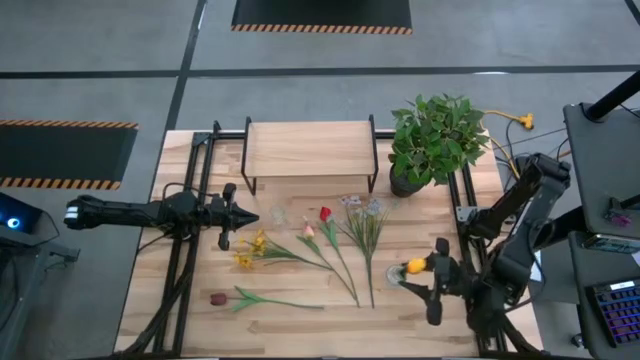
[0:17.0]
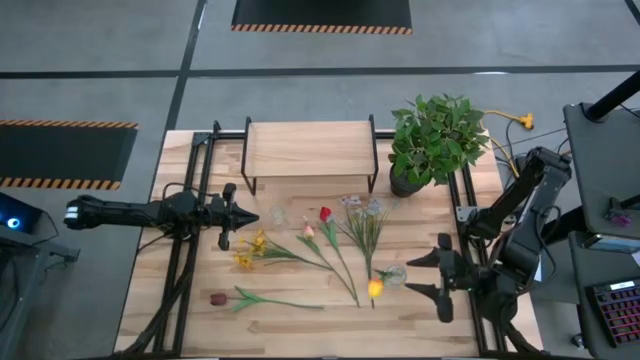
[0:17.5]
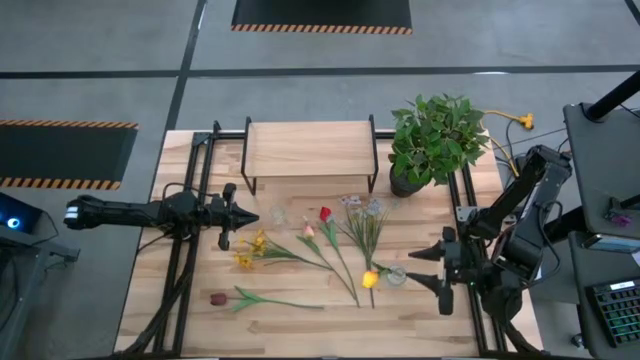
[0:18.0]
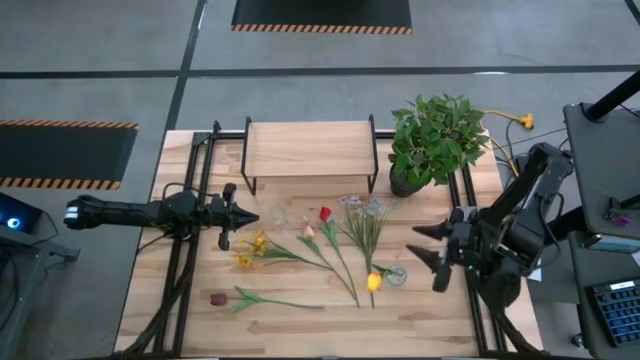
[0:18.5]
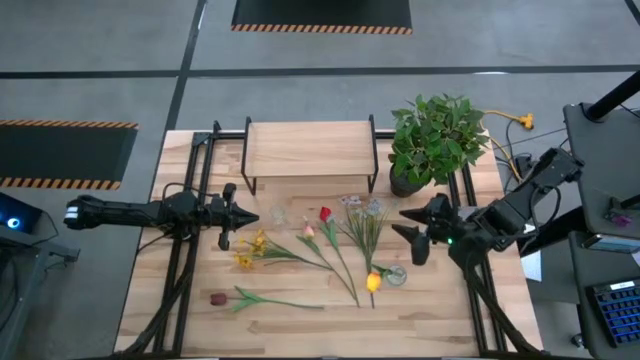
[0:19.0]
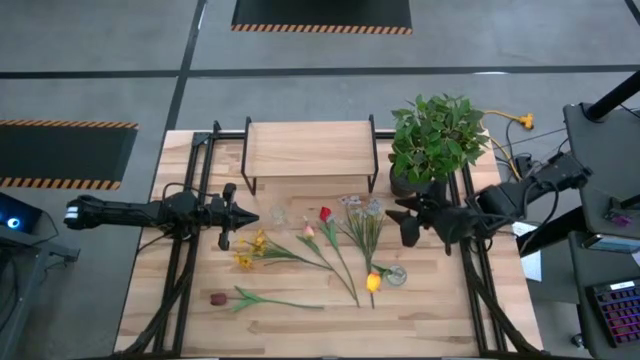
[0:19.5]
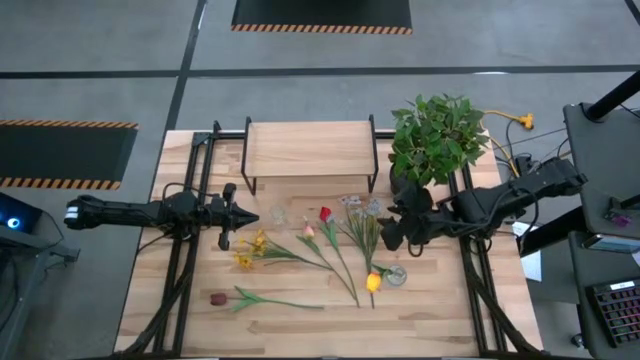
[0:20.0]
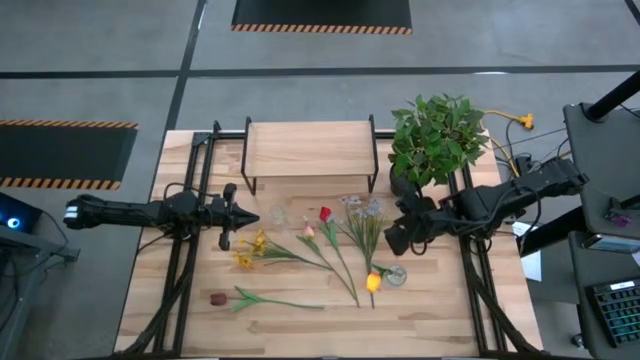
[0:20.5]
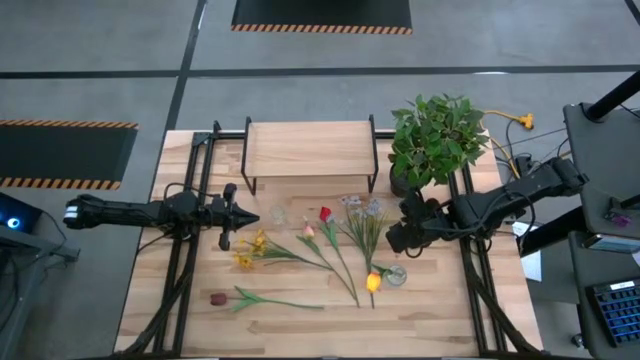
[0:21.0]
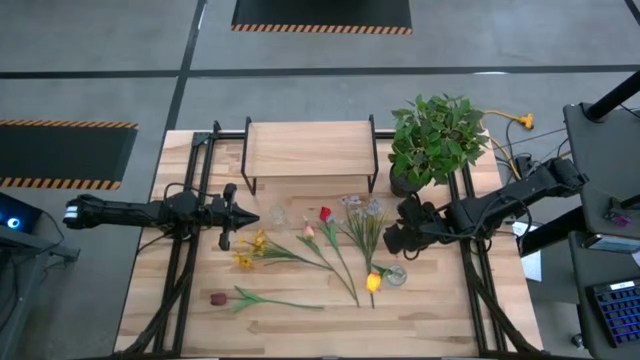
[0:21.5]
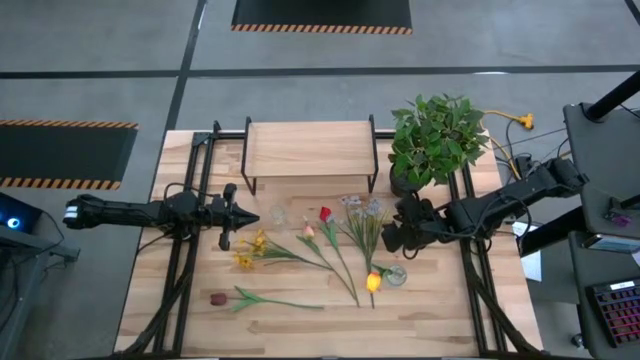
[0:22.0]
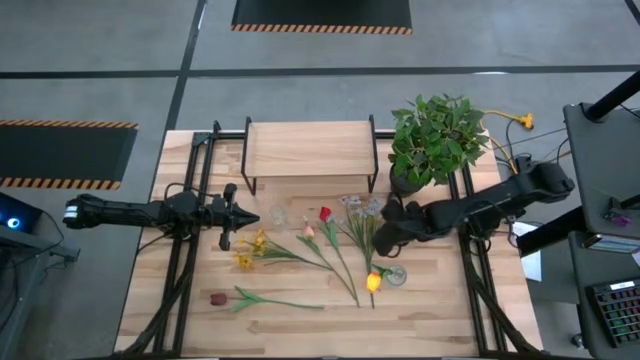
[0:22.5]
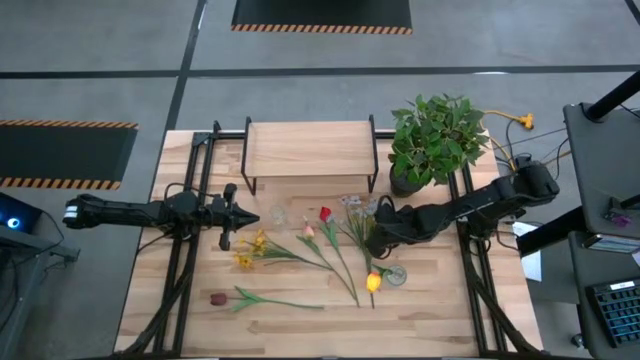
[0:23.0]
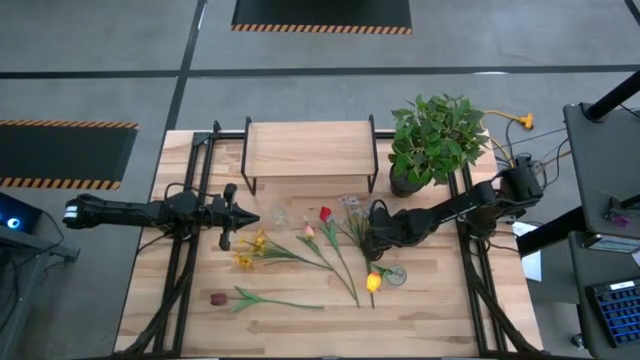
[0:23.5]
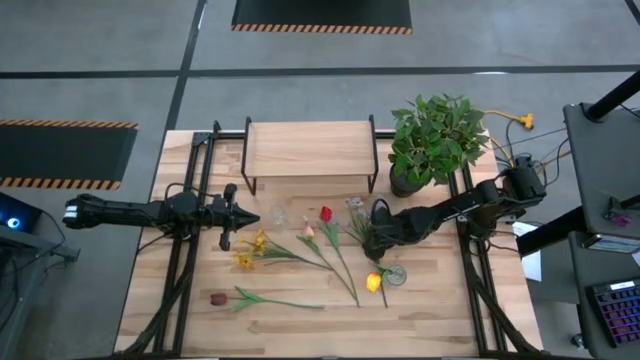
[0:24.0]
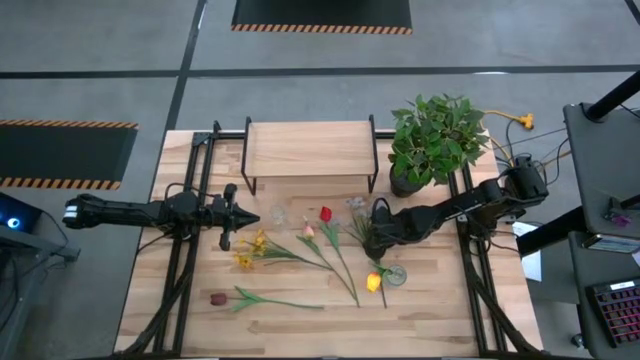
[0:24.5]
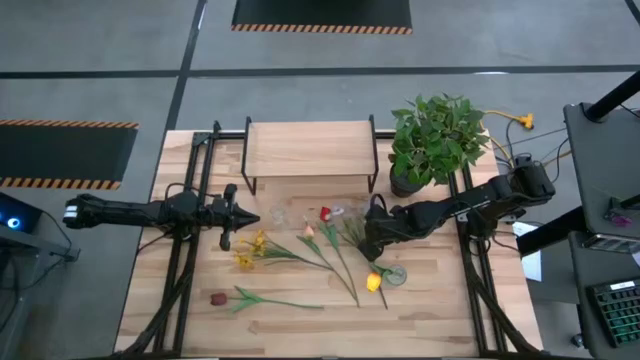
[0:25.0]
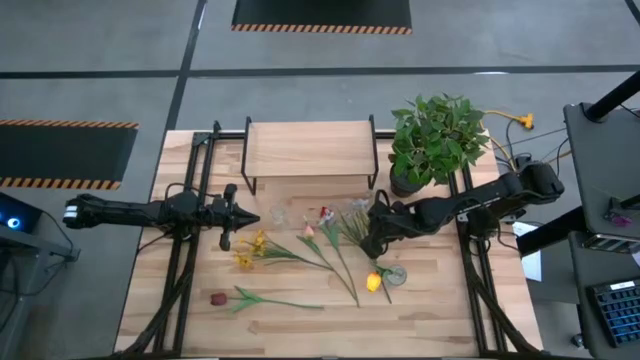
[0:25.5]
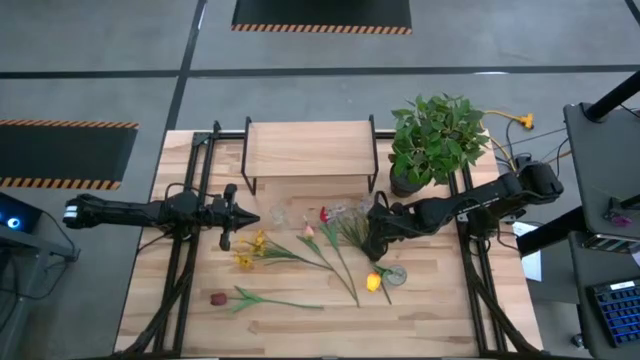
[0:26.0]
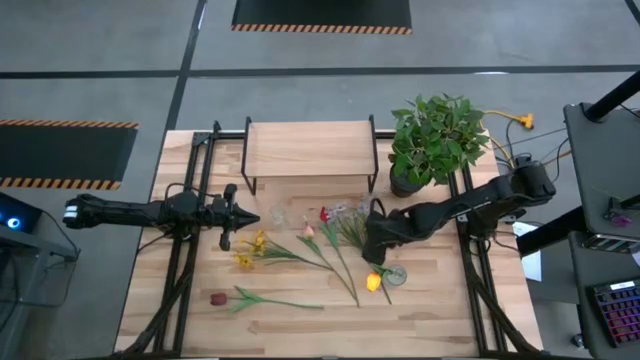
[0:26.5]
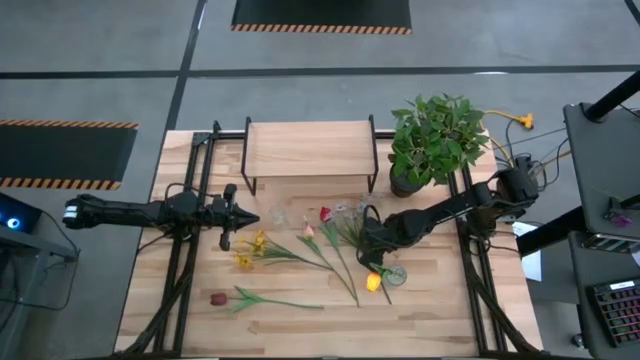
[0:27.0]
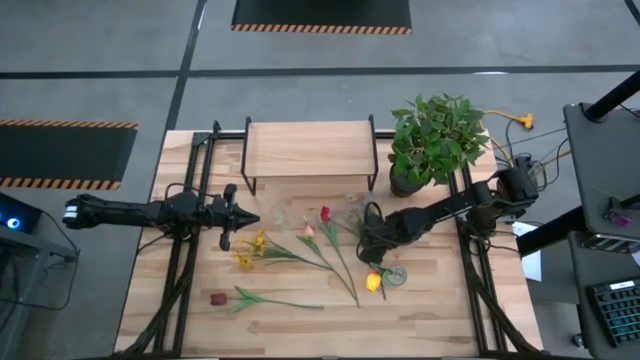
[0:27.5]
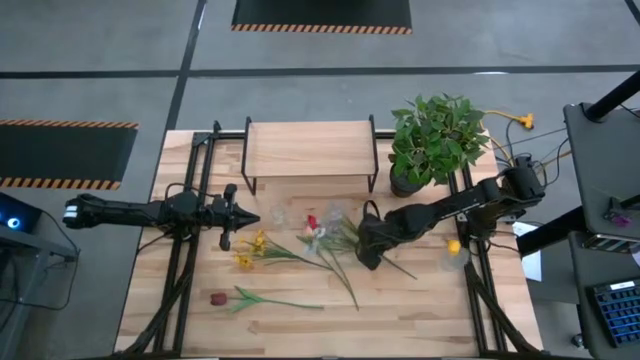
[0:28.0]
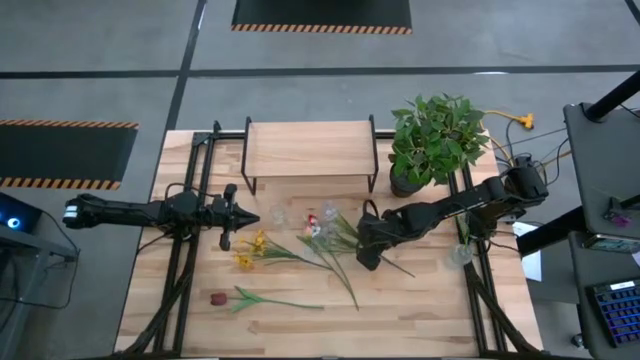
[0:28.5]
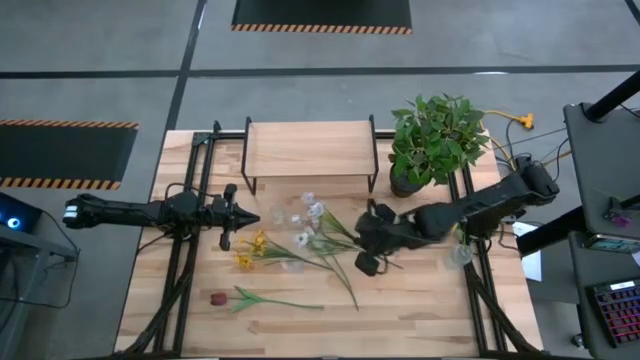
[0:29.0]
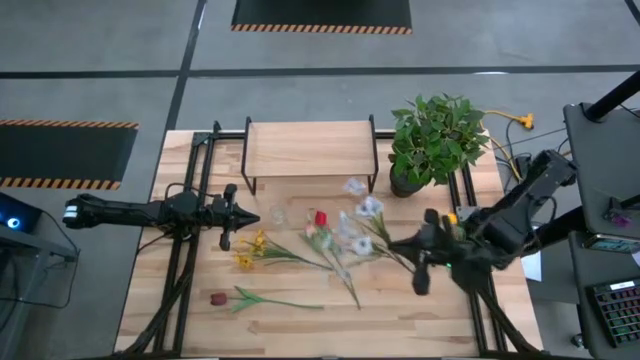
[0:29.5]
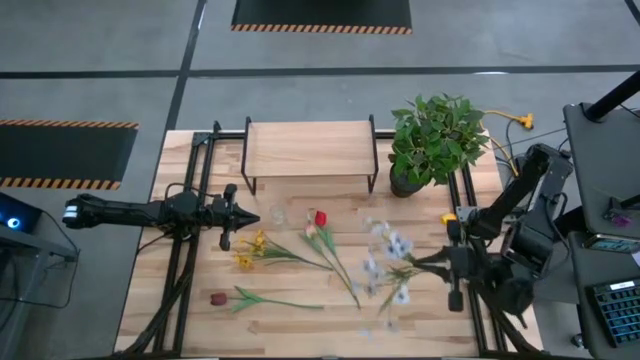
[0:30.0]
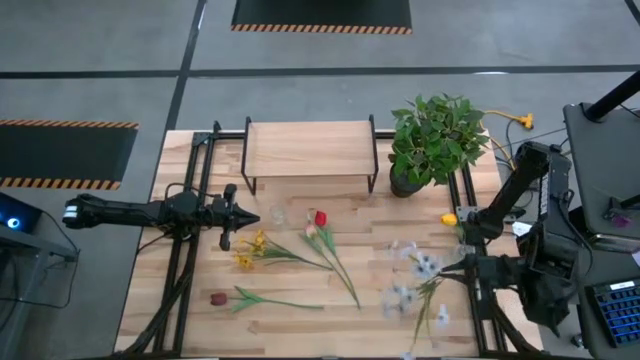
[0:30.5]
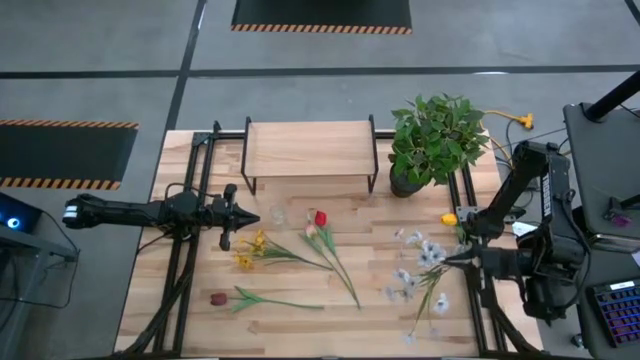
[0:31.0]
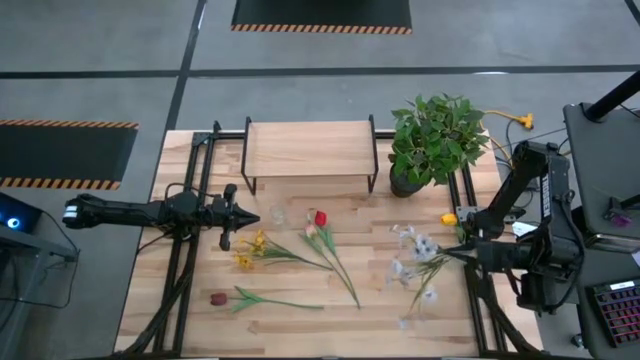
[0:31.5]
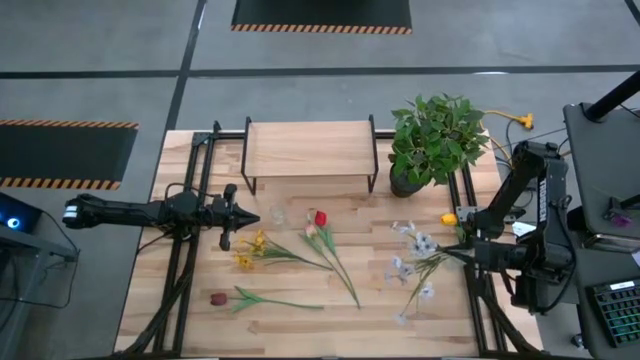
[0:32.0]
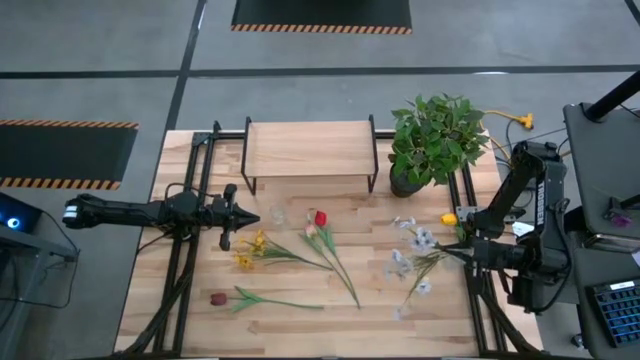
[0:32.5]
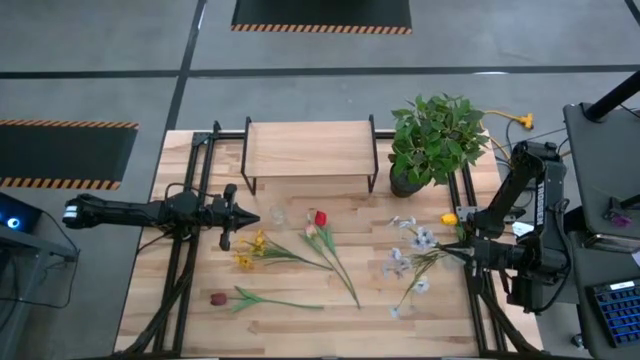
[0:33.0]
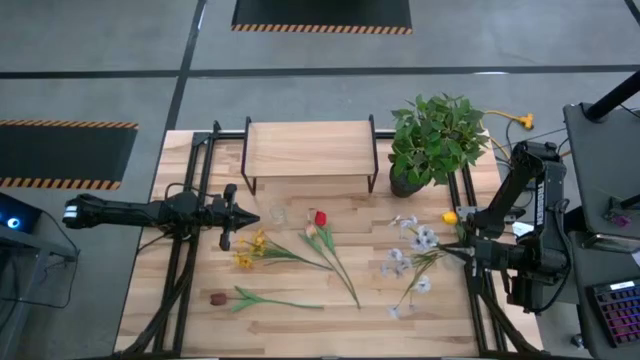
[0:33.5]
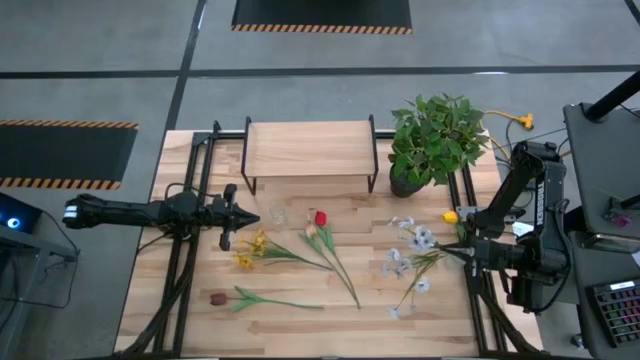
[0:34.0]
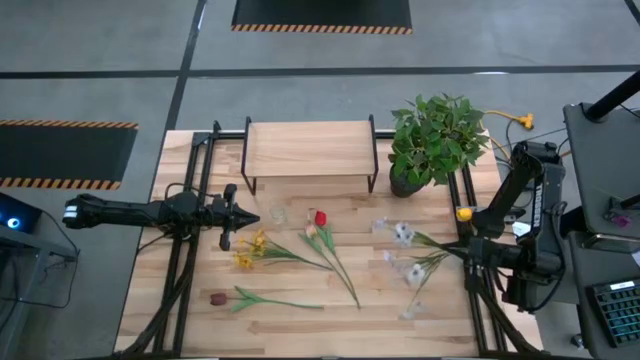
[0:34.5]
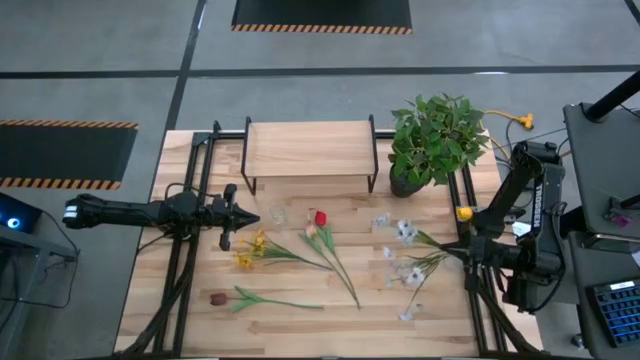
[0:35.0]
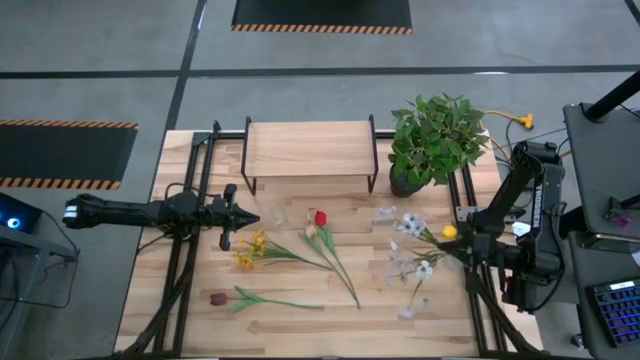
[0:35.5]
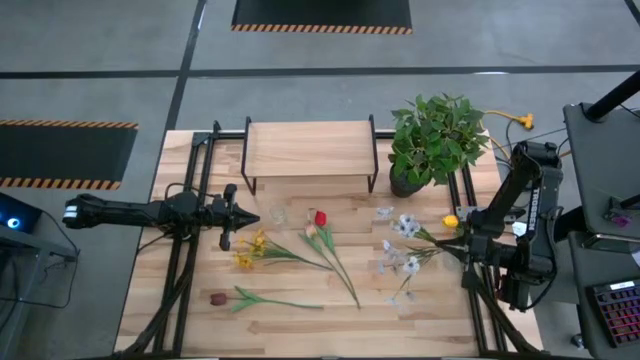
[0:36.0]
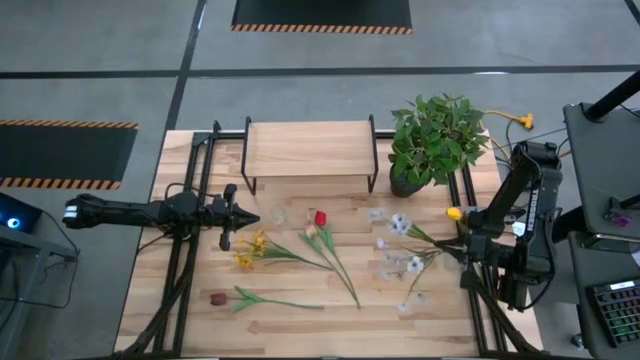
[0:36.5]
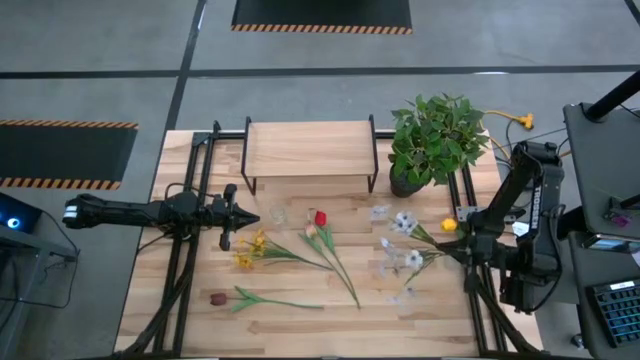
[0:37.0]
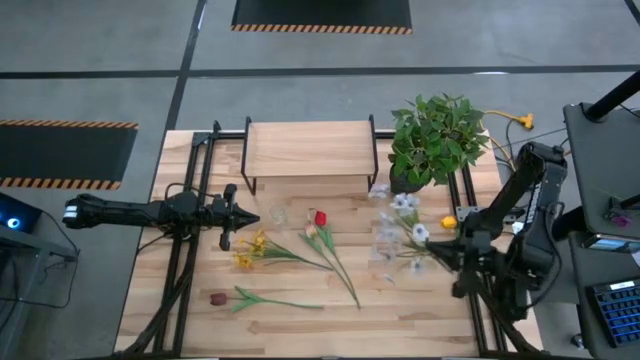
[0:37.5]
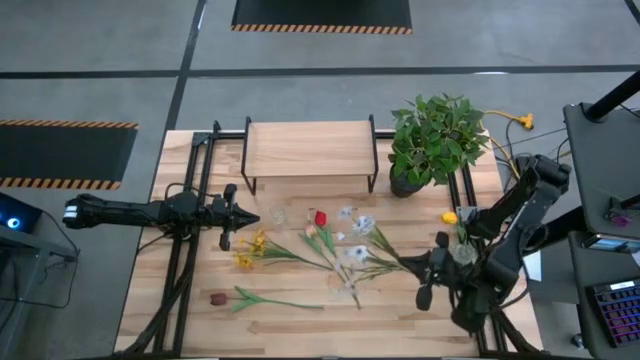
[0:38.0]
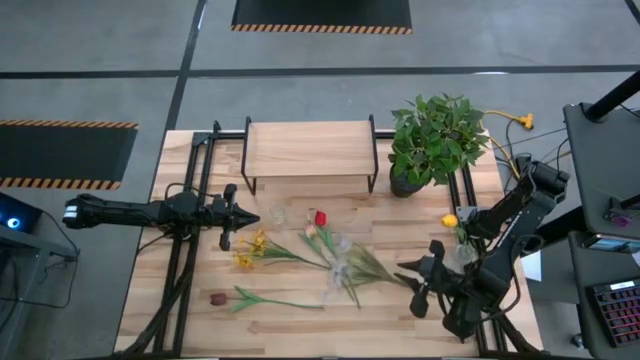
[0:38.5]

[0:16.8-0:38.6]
Task: Pick and place flowers into a vace then onto a shelf
Put the white flowers into the right transparent vase
